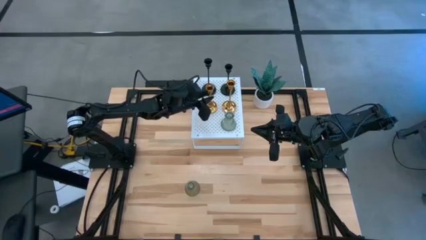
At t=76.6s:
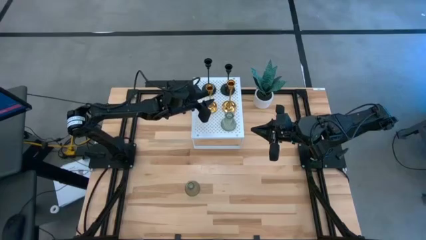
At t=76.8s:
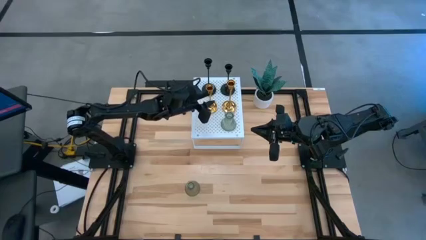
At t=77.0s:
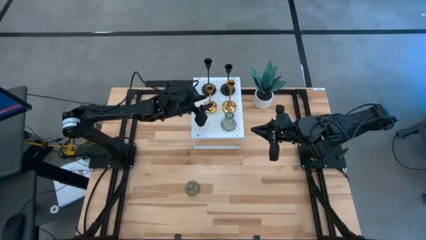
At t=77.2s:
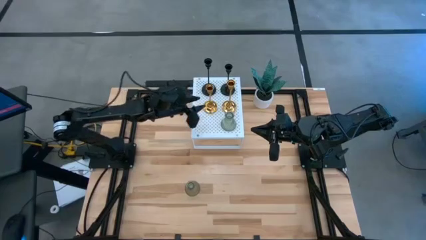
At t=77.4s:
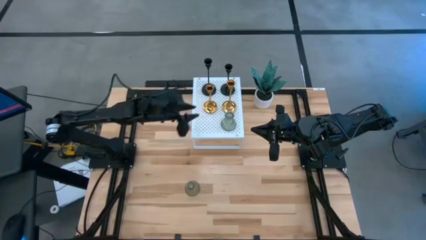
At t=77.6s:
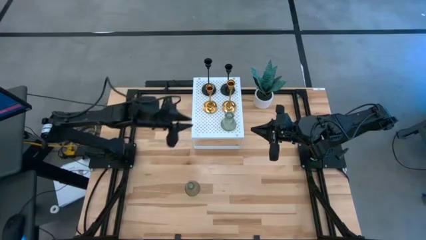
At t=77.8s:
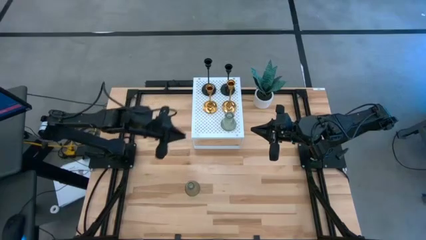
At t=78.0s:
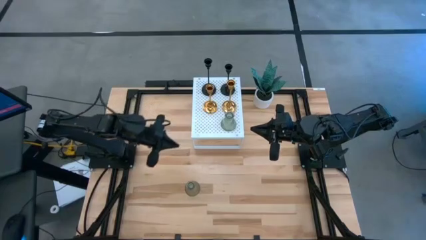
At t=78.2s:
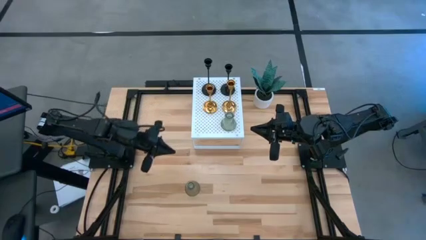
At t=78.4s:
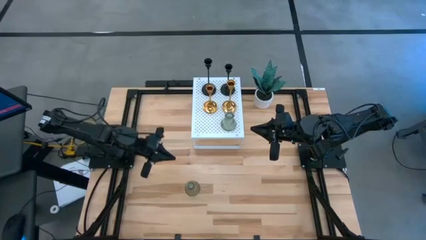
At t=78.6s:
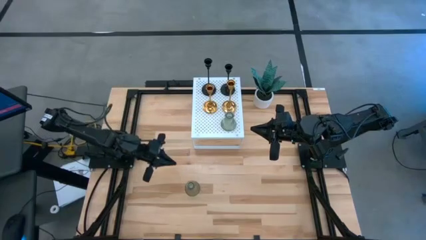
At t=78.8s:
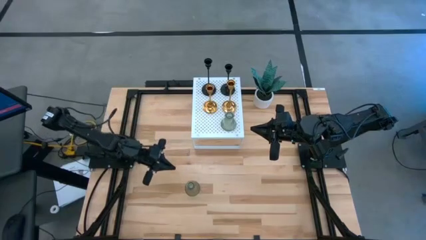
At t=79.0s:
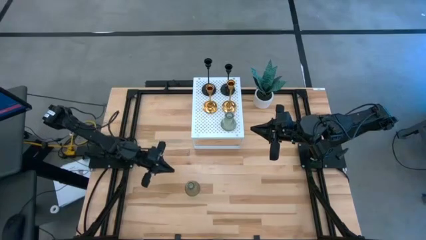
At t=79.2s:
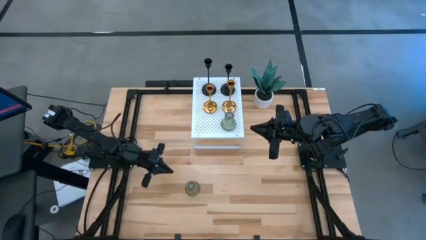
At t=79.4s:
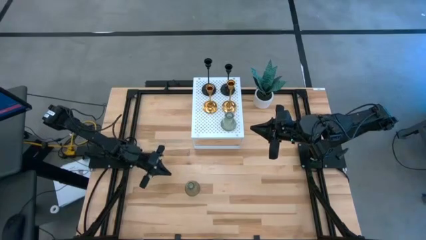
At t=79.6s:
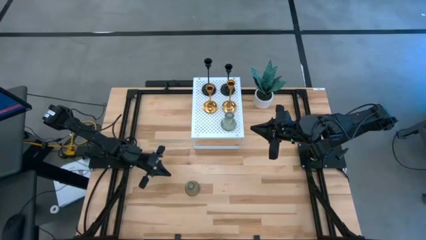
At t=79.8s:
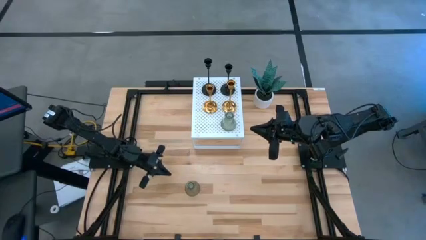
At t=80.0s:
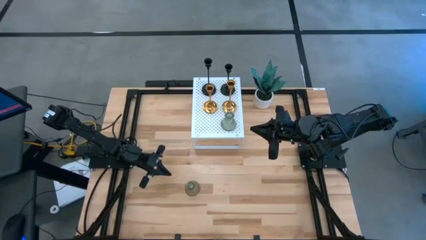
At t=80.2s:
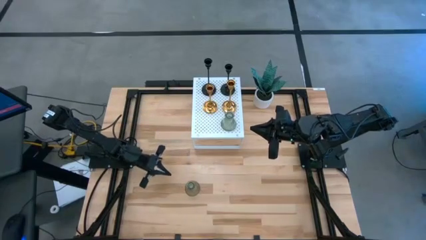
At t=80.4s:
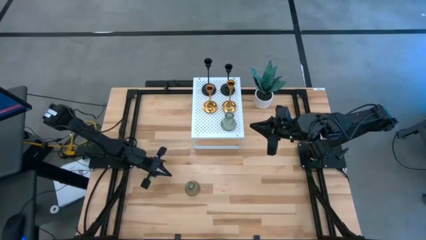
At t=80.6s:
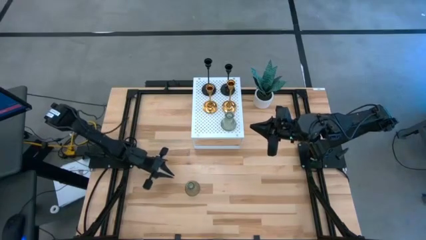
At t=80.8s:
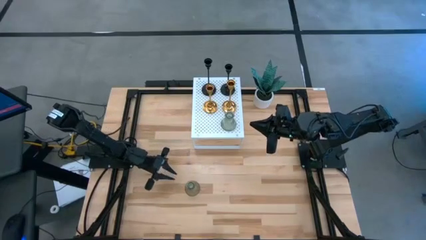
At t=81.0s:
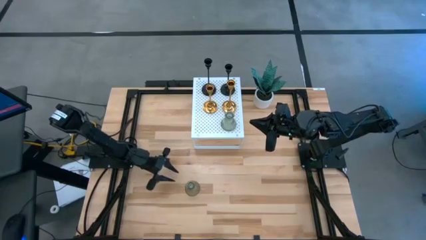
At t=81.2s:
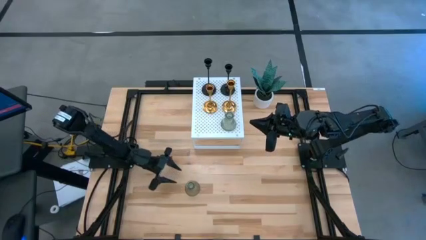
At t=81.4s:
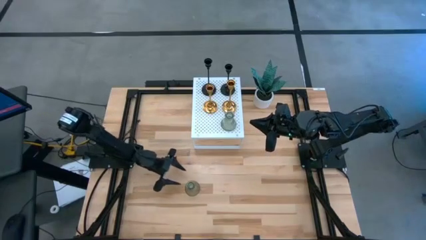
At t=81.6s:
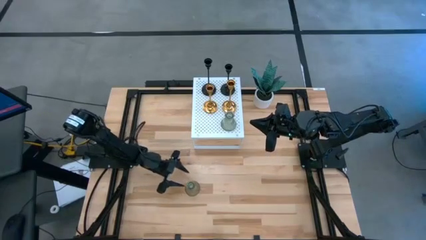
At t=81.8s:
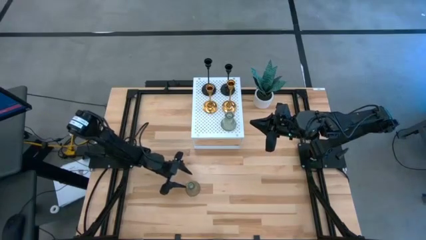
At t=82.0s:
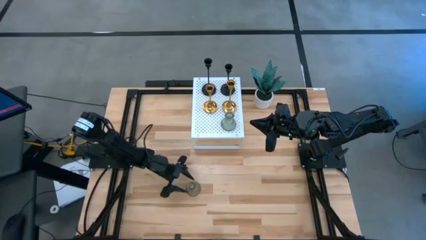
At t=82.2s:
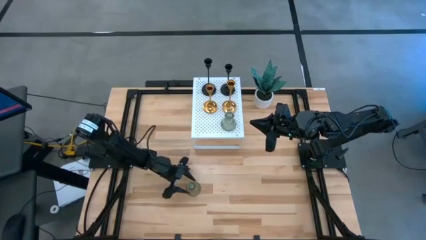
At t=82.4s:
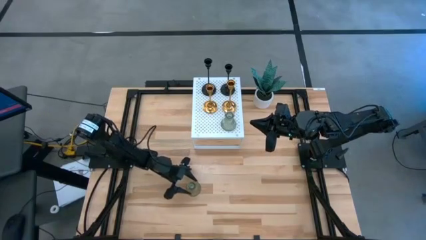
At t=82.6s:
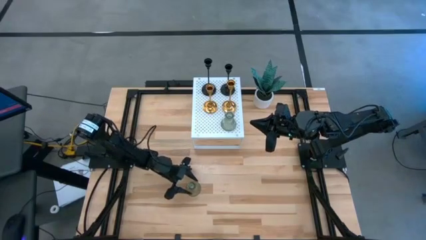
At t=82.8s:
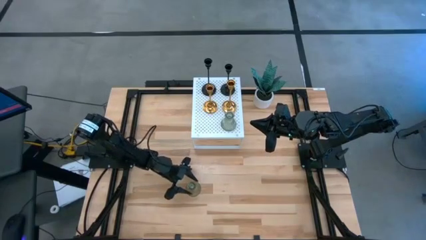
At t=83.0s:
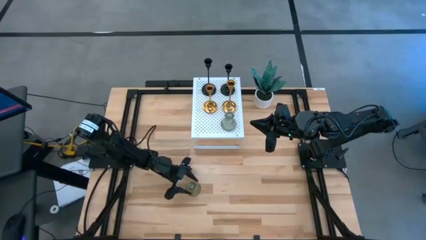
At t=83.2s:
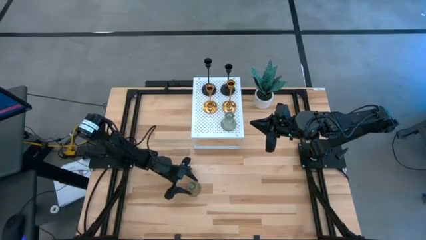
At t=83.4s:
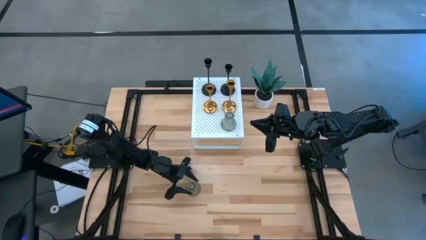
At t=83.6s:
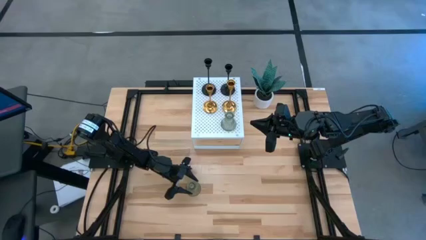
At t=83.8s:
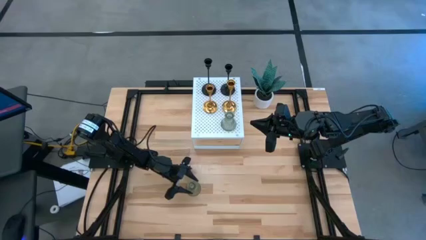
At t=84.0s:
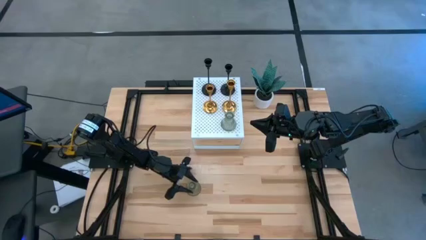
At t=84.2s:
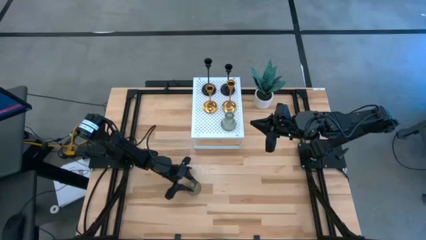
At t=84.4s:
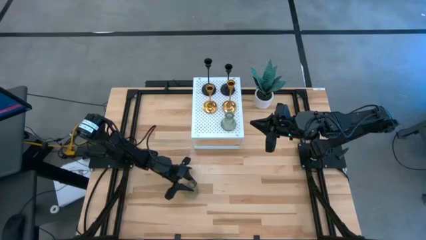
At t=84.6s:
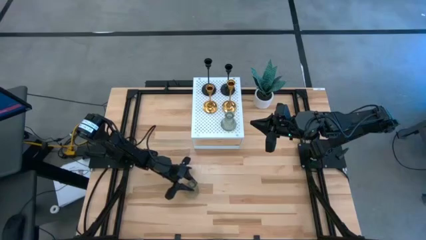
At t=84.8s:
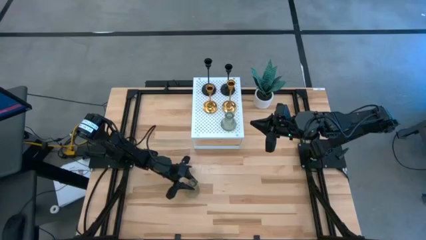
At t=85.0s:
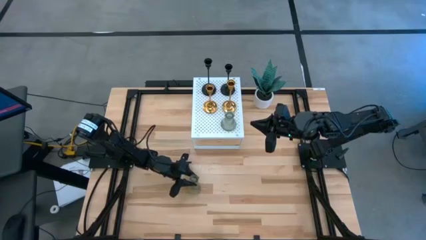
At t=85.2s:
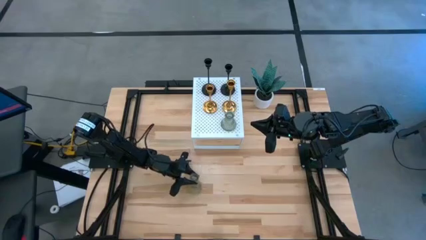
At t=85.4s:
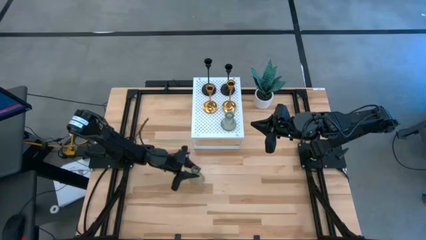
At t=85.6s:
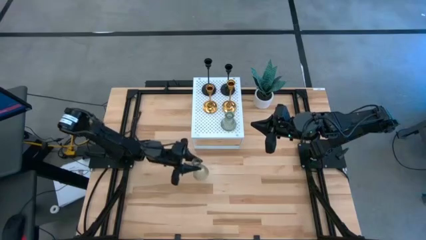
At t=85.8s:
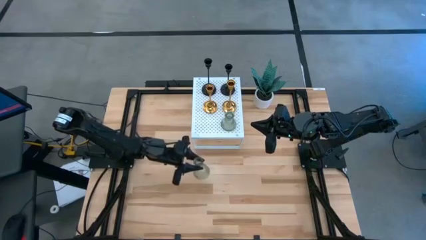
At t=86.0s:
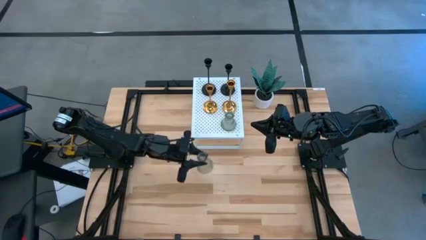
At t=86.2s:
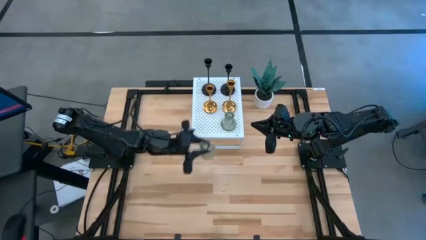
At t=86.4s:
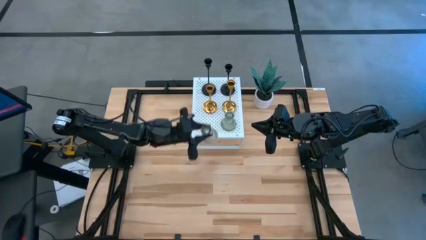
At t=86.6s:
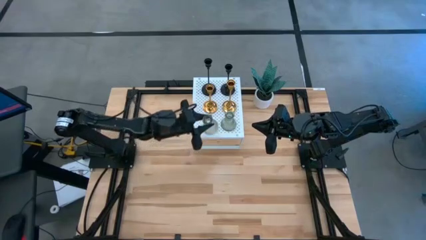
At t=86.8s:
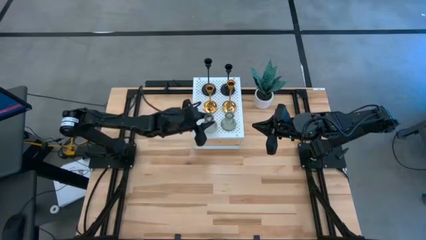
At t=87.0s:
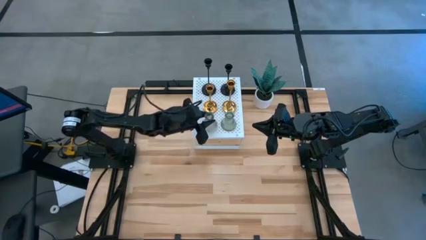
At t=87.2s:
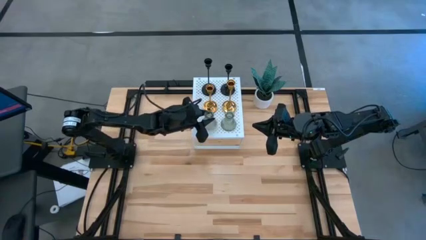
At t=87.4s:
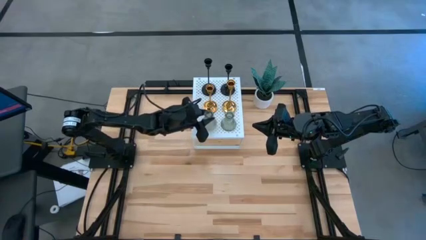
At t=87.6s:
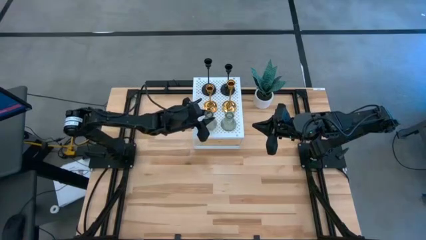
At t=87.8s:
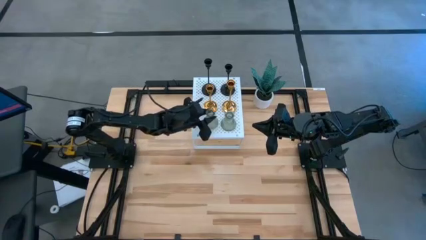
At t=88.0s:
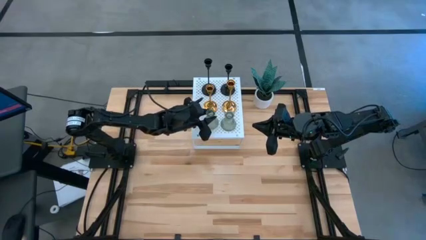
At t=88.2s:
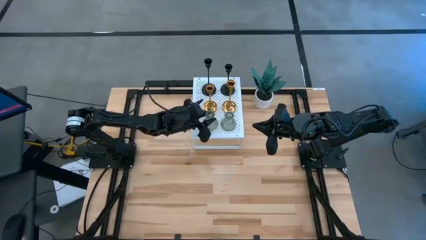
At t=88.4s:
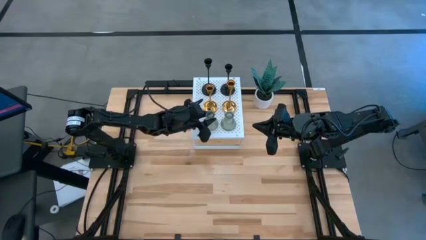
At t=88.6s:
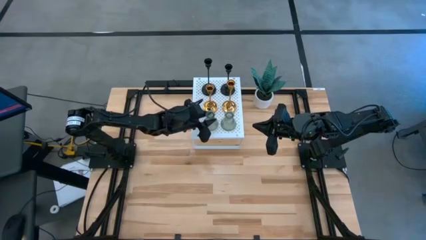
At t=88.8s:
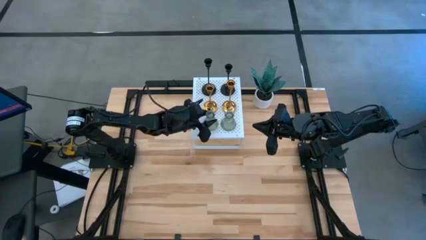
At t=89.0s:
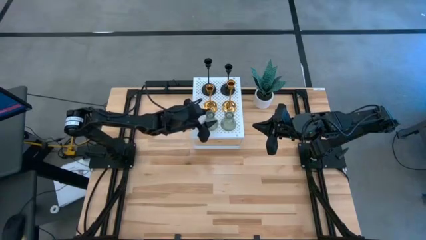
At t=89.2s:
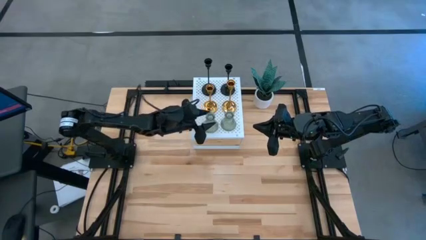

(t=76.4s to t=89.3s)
Task: Pick & Place candle stick holders
Put the transparent glass candle holder aligned with the other transparent glass candle holder on the shelf
